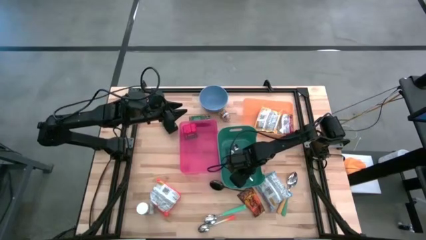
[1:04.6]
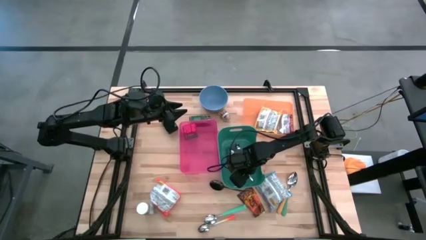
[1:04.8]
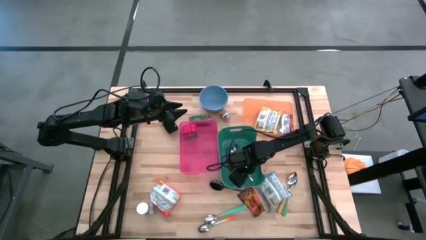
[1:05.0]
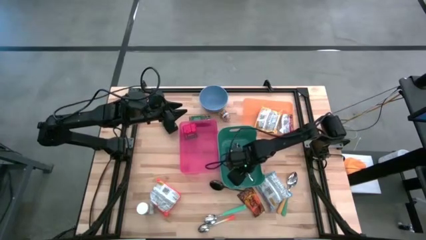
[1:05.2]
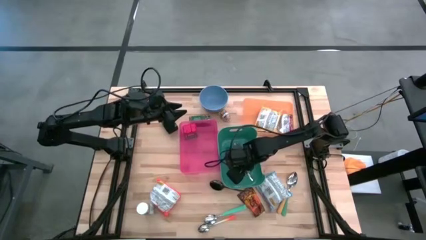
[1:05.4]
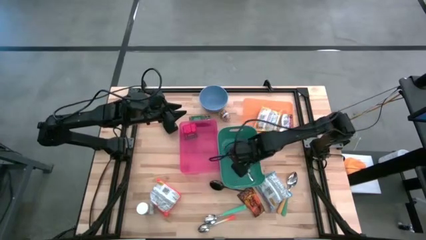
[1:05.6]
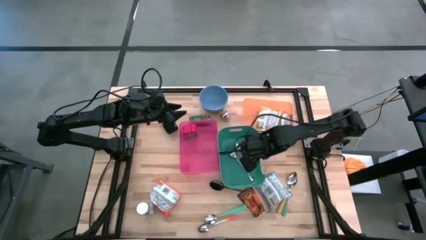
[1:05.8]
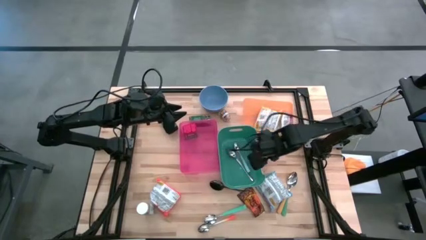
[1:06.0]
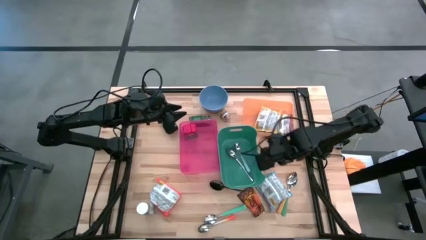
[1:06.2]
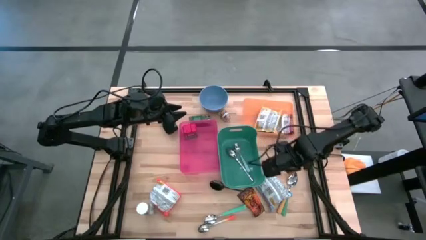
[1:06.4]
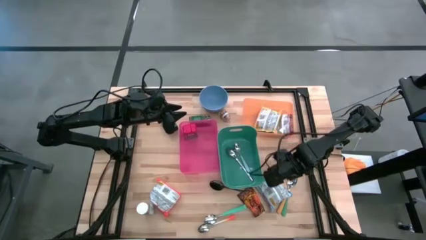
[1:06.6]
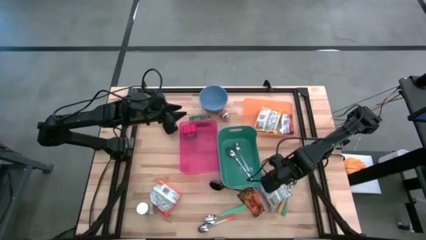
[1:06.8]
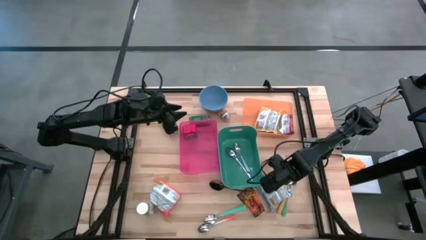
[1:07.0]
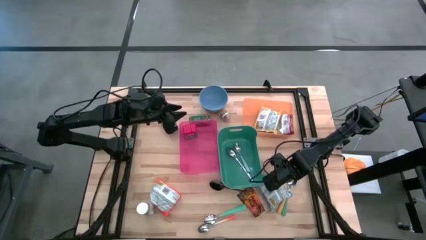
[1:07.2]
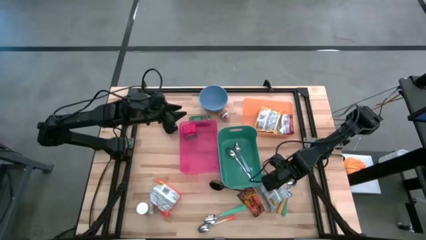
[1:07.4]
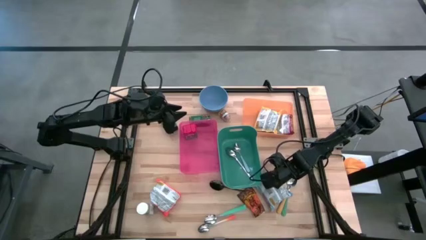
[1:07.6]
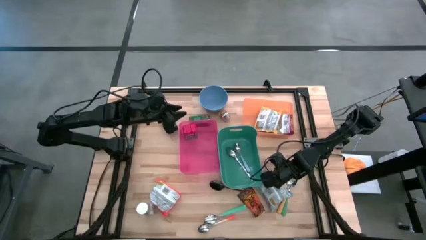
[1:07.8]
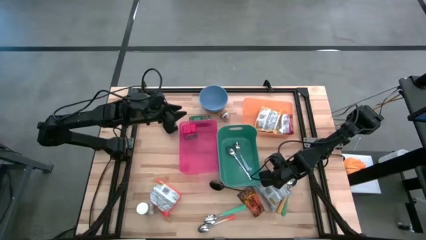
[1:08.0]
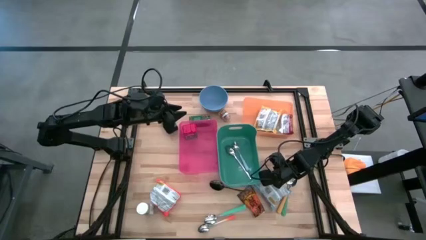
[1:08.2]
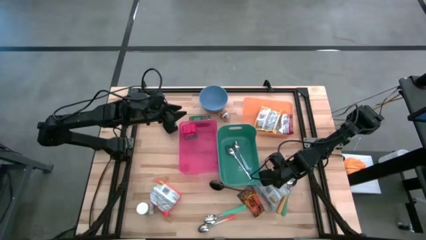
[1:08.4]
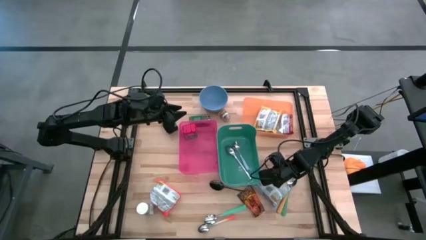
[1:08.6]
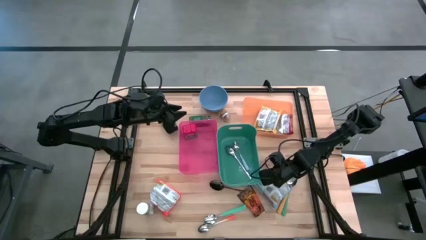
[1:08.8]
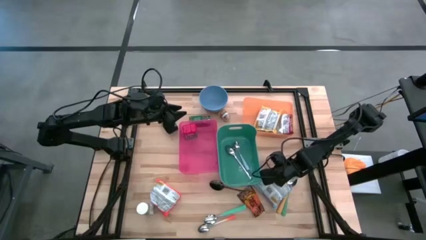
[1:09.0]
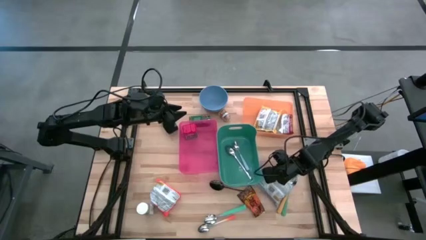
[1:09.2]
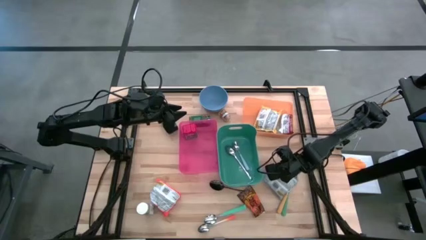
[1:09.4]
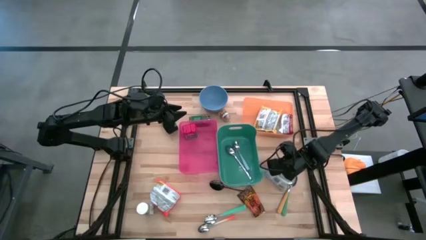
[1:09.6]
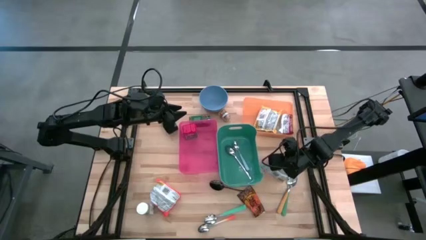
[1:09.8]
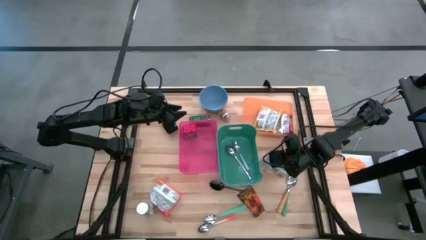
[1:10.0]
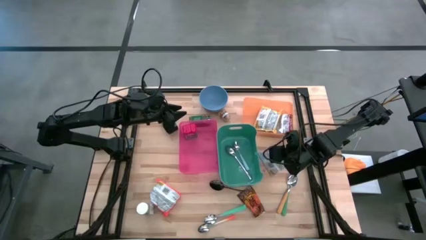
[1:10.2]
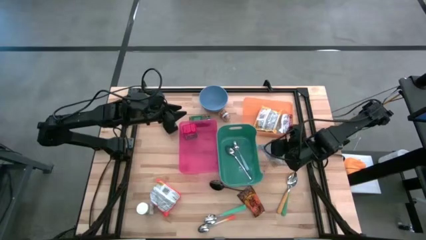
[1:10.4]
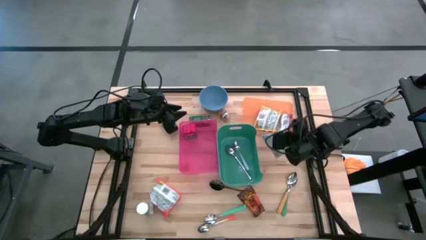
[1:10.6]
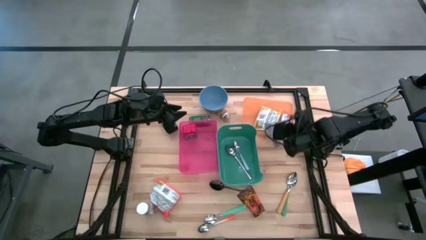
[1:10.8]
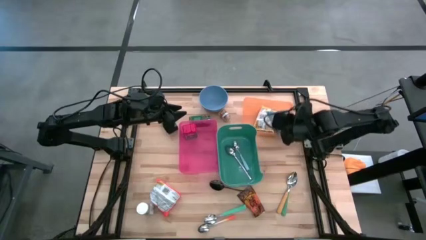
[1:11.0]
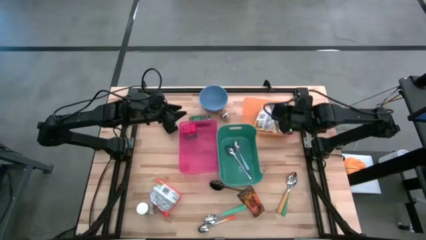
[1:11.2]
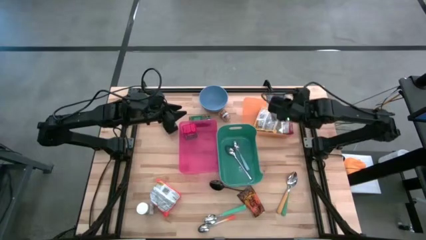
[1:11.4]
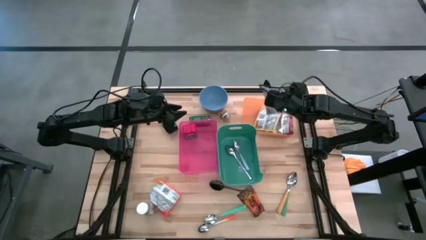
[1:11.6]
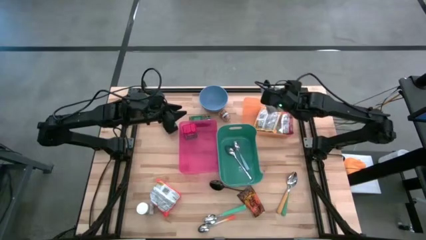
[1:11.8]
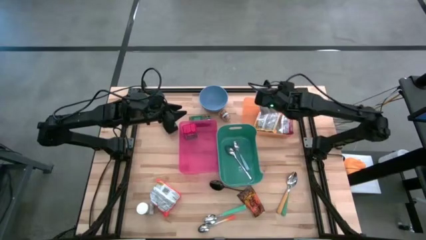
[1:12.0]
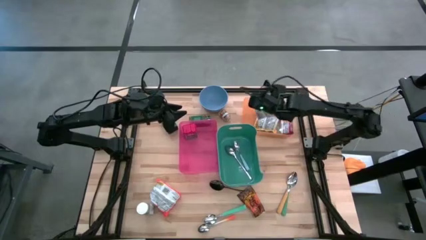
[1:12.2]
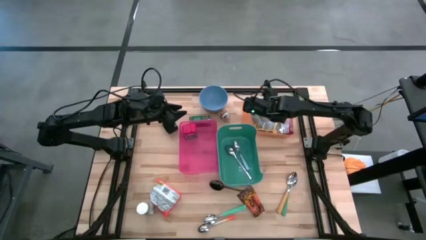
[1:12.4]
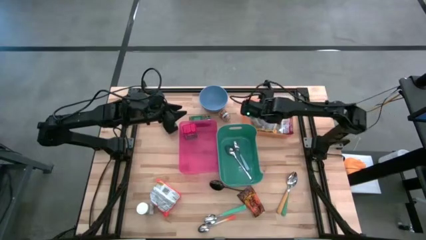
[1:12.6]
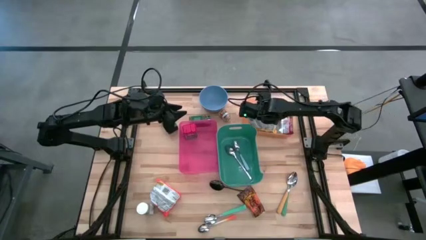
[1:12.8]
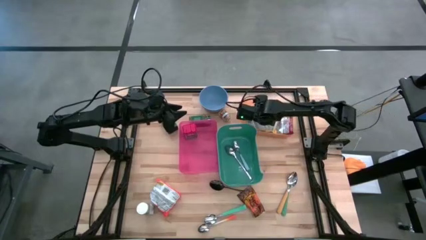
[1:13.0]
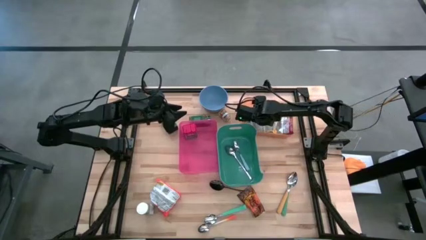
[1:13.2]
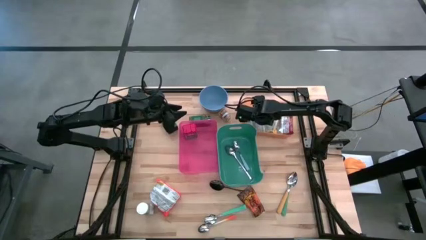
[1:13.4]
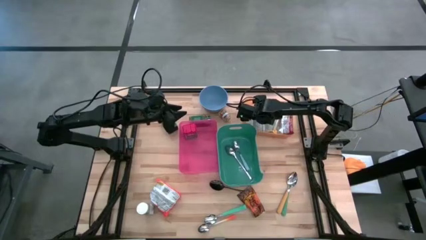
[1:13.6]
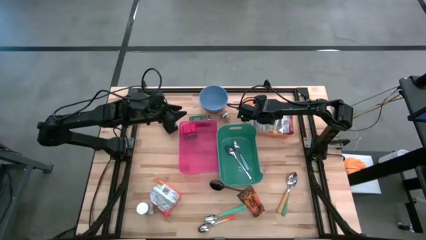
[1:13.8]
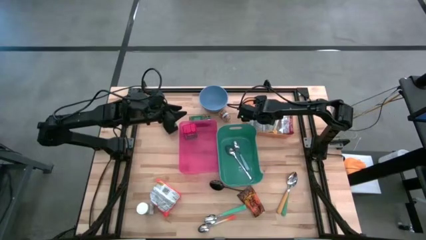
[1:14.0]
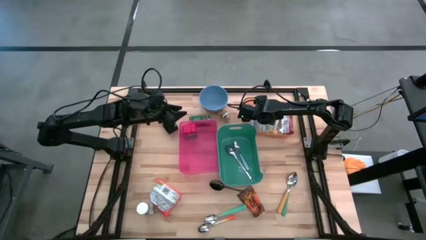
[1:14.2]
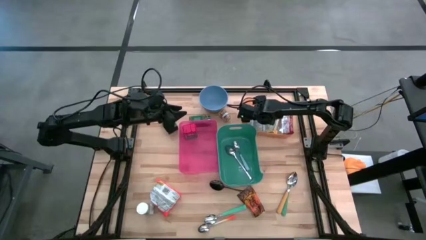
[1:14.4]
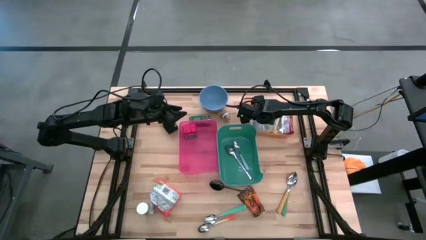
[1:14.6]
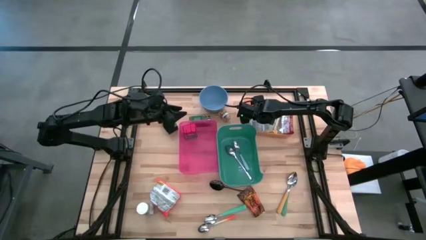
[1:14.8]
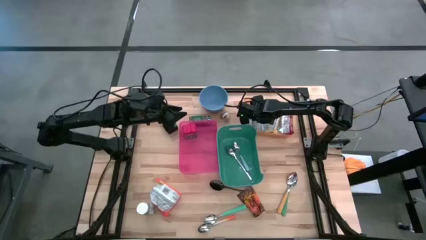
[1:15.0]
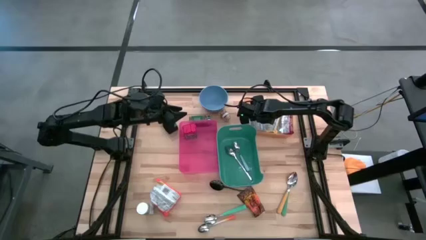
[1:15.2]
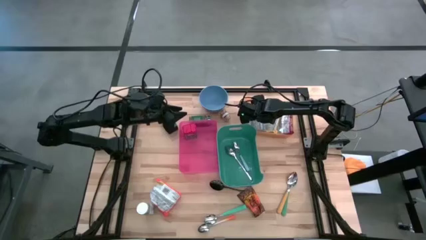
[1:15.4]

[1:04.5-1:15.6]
Put the blue noodle pack into the orange bin

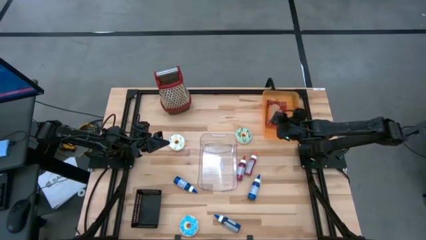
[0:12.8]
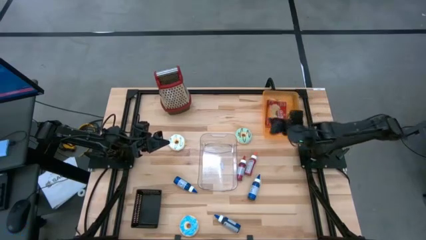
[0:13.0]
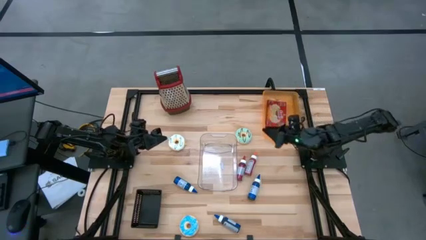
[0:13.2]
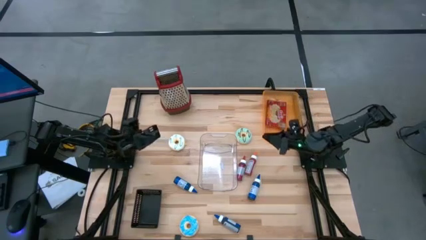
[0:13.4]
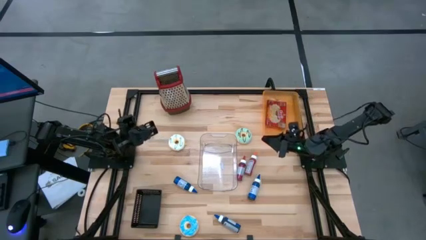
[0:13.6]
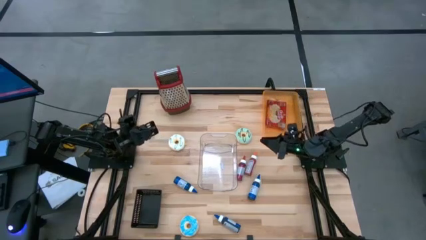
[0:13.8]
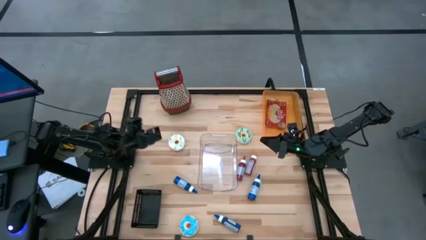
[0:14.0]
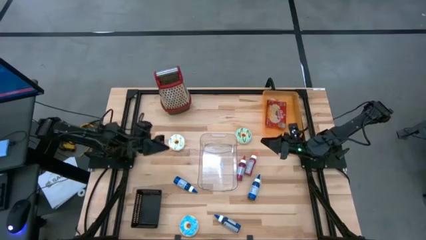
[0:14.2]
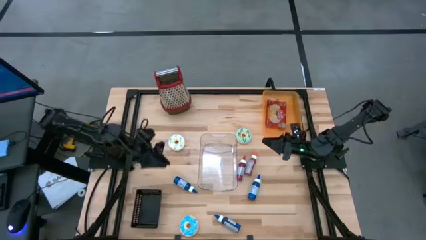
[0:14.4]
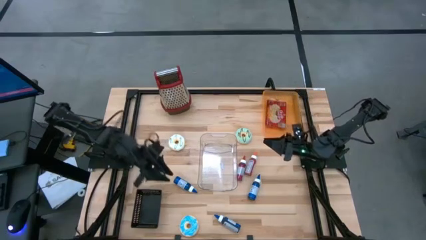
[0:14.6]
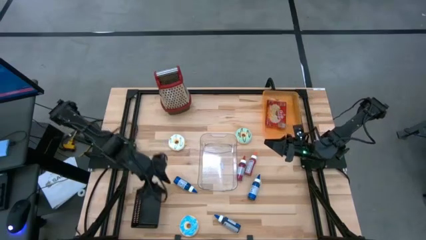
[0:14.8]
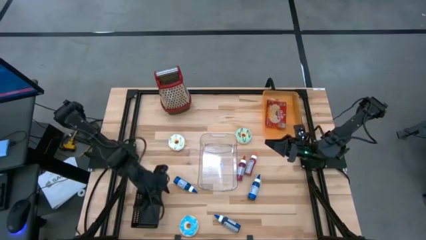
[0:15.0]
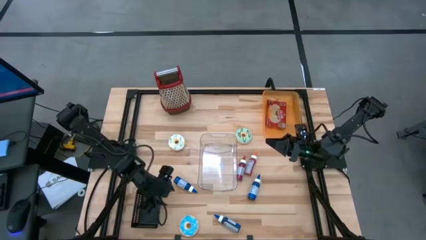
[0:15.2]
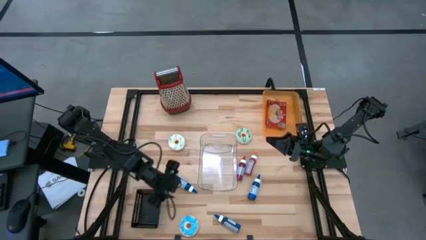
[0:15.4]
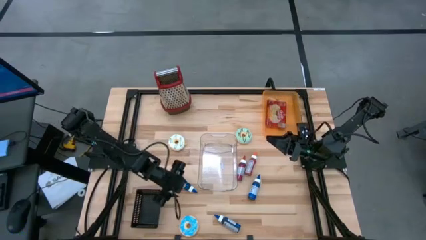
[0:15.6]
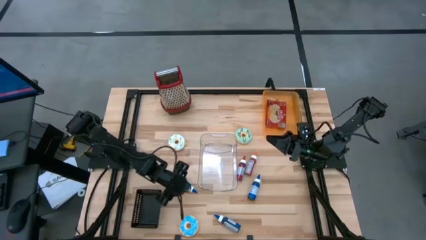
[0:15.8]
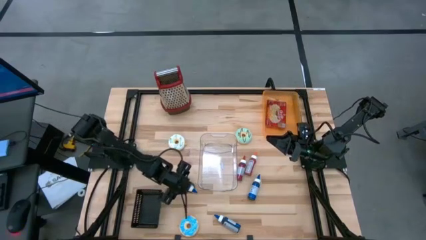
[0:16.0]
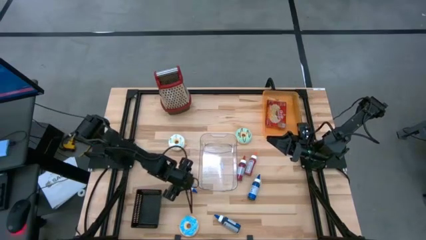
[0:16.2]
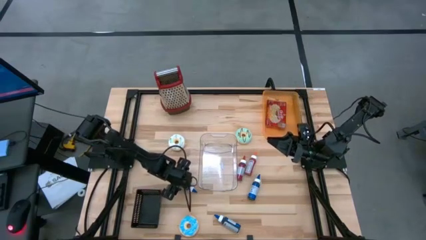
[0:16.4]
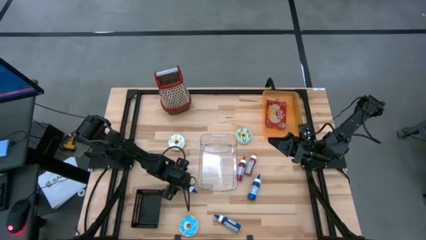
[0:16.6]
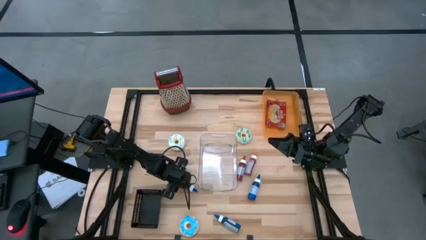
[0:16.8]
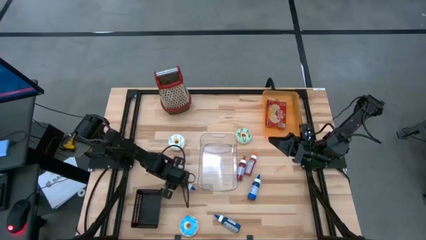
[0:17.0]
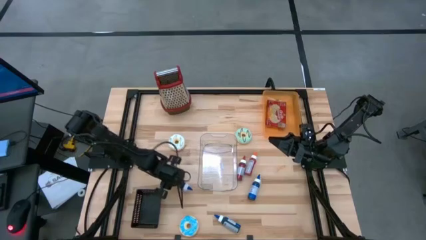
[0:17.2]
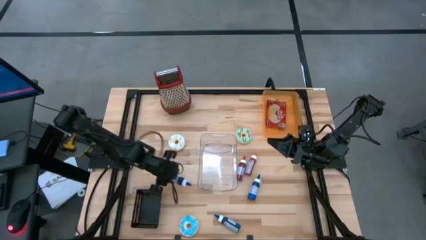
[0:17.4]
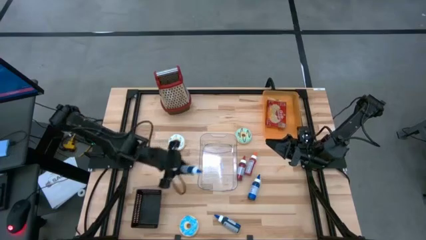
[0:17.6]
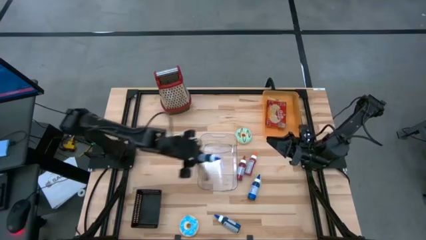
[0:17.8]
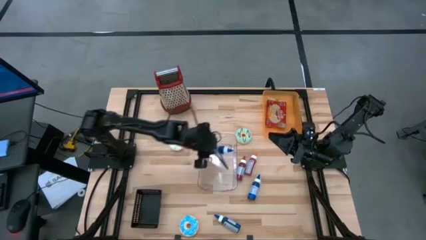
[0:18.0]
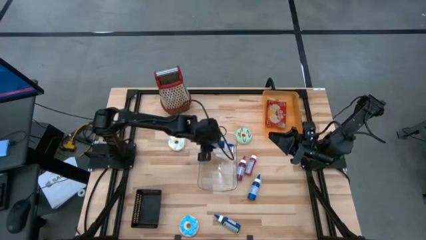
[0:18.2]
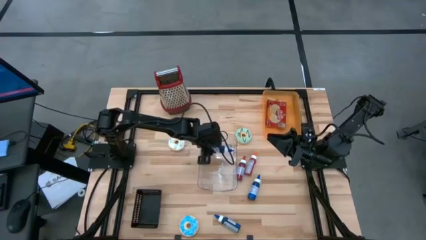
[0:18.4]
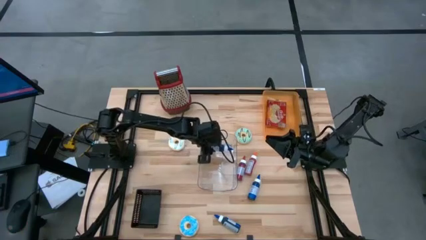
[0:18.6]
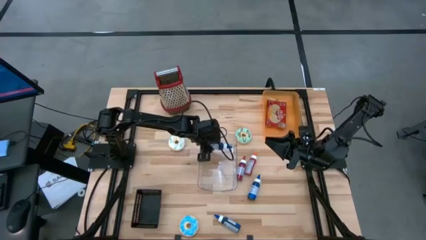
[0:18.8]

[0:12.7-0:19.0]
Put the top left blue food coloring bottle into the transparent bin
